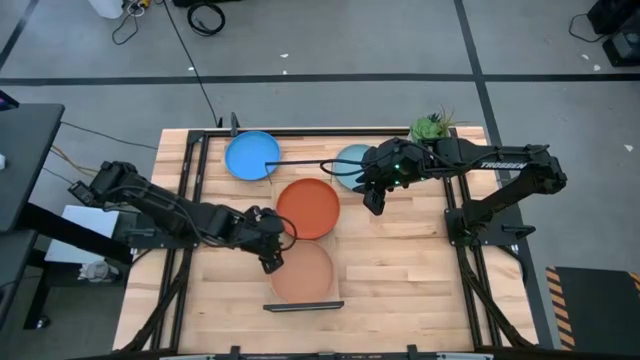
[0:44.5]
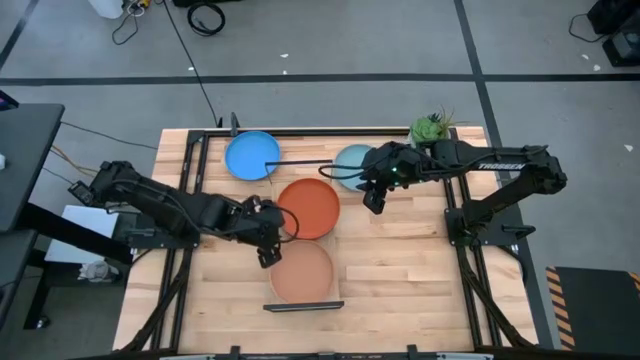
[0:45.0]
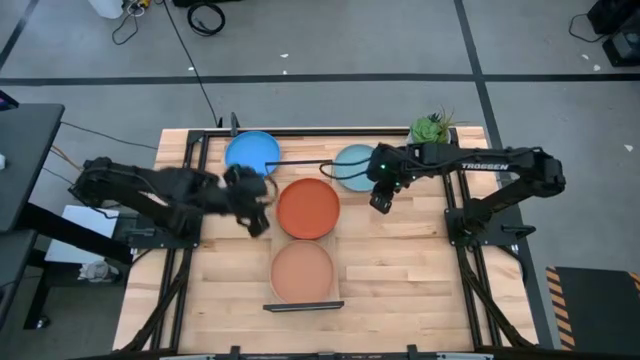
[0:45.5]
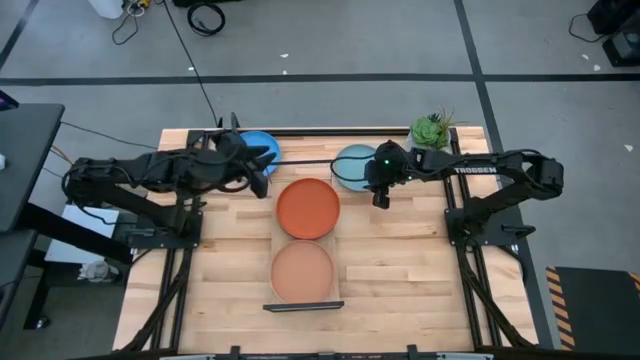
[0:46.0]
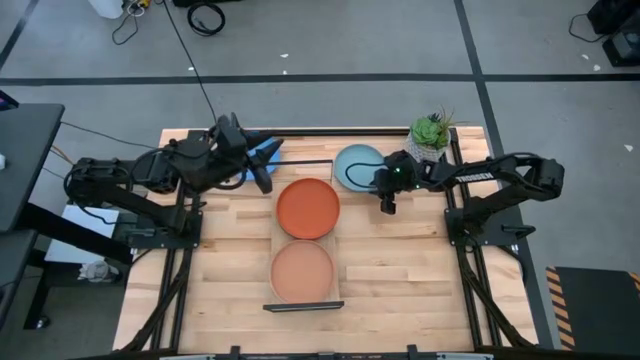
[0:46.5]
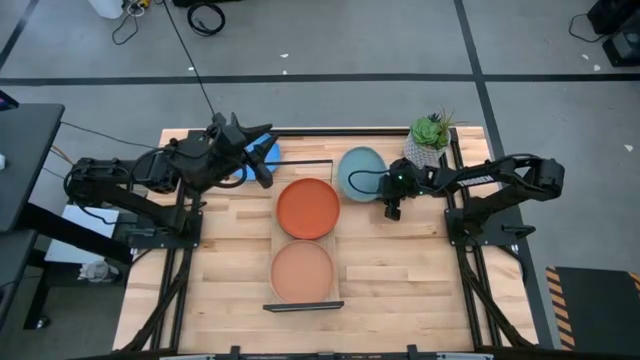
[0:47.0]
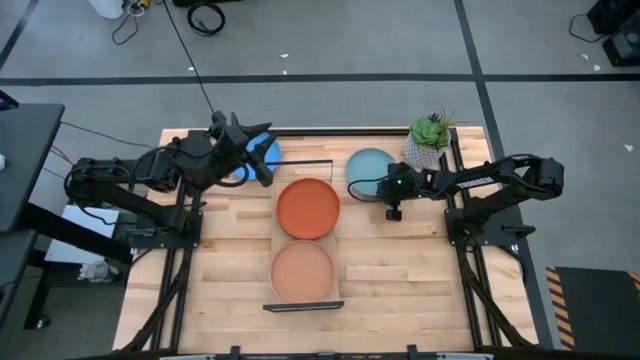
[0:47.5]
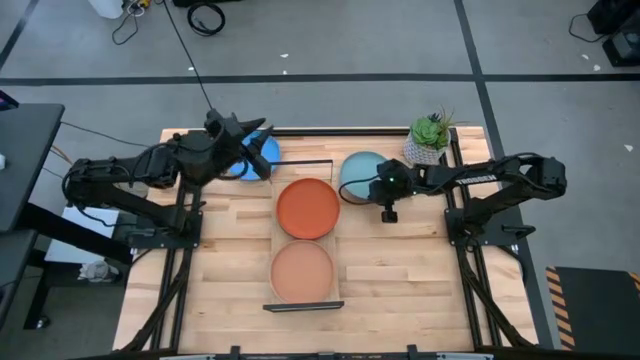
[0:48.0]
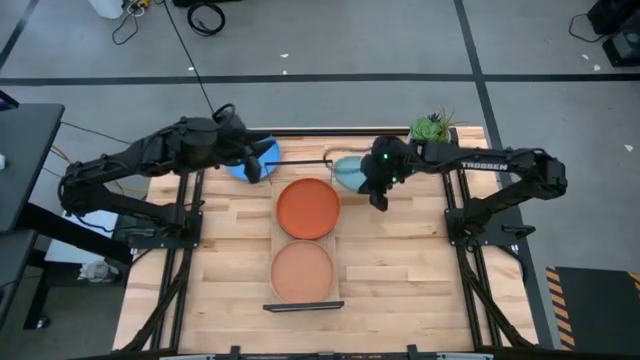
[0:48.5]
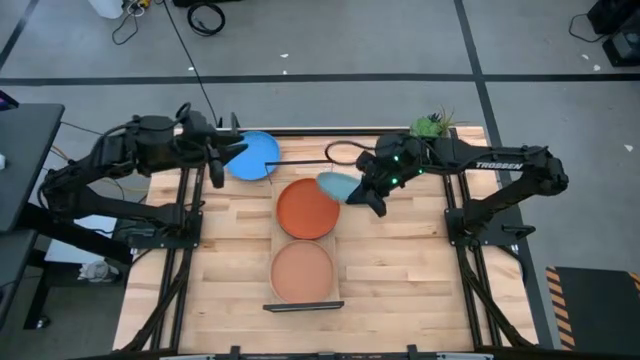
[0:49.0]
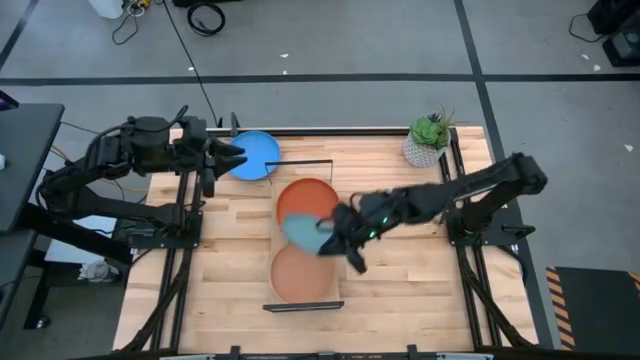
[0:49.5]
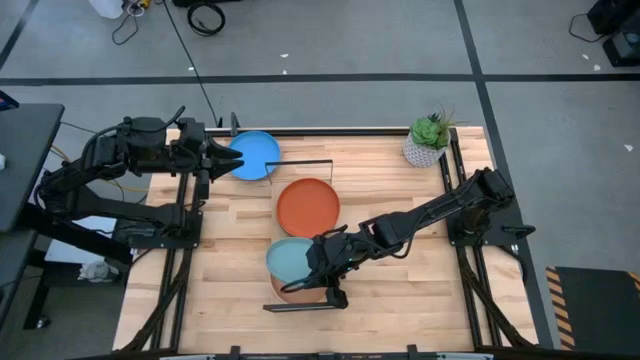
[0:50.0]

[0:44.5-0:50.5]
Task: Place and stack plates onto a shelf
Stack the light blue plate on the brown plate on the shelf

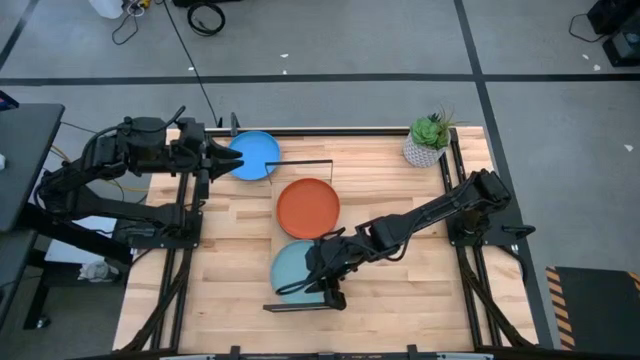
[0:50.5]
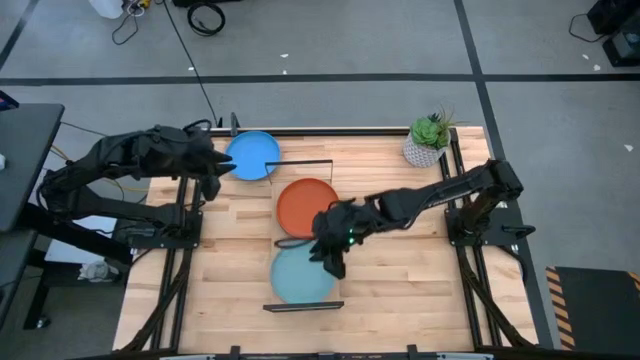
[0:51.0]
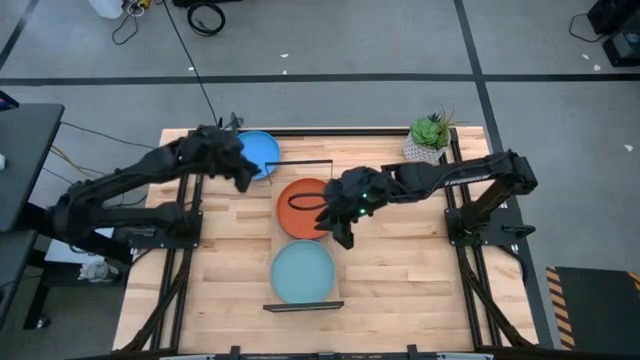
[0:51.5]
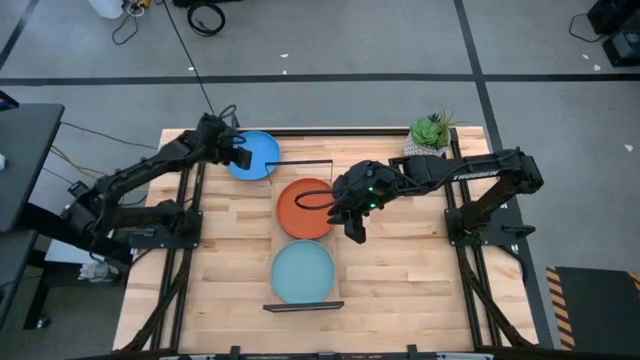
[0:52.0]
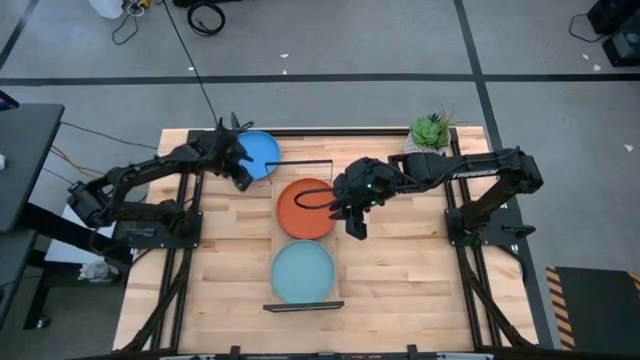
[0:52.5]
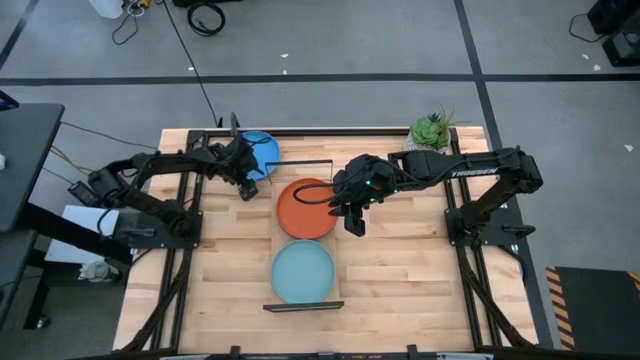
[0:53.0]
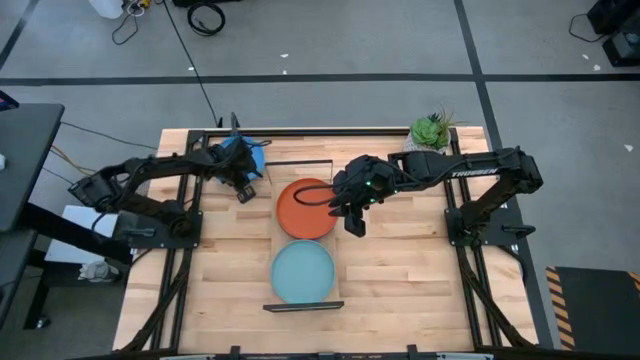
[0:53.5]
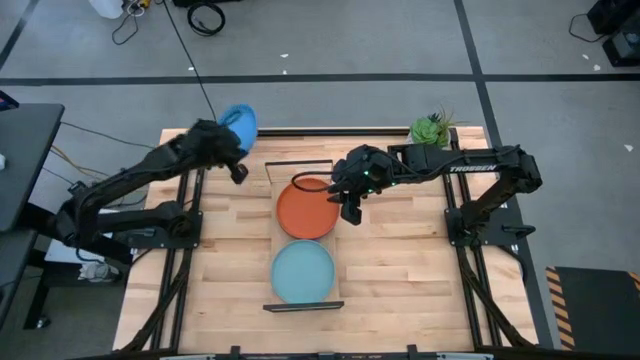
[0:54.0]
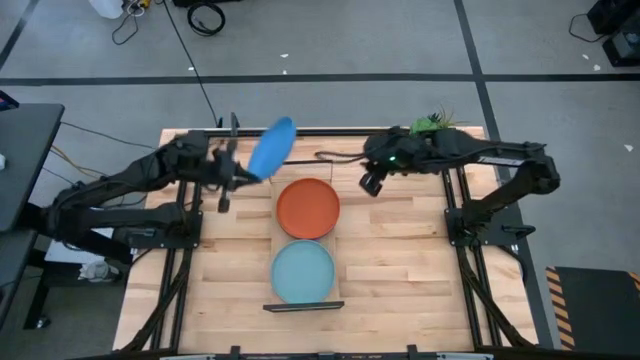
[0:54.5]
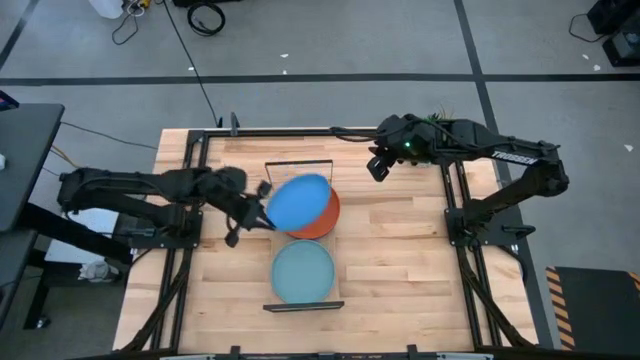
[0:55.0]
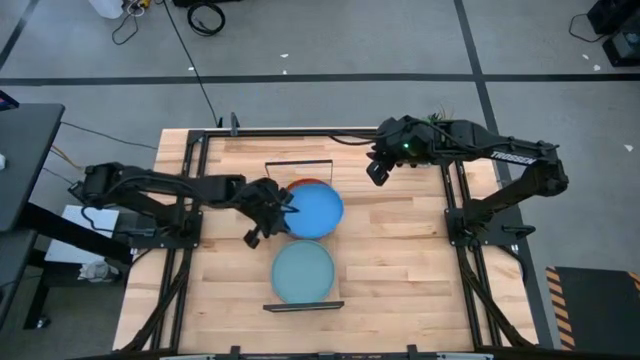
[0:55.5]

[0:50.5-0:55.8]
Stack the blue plate on the orange plate on the shelf

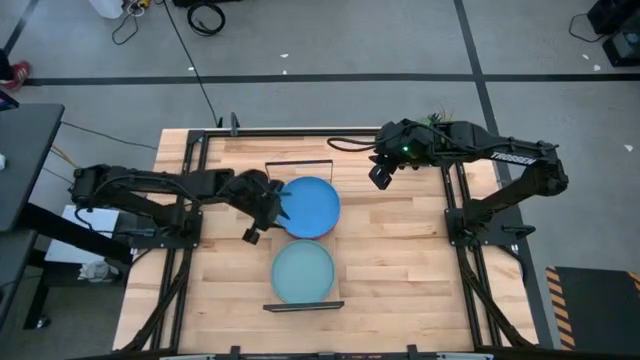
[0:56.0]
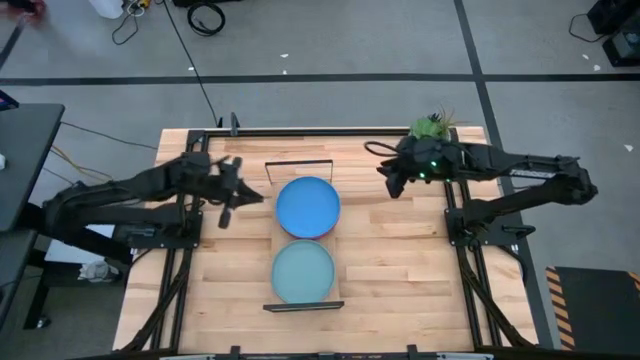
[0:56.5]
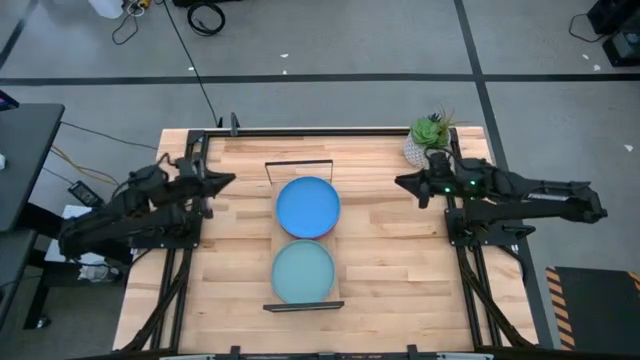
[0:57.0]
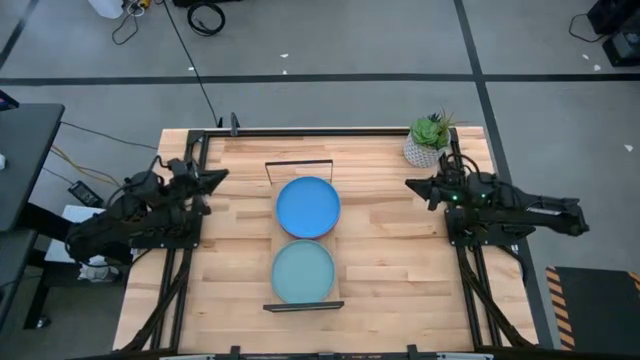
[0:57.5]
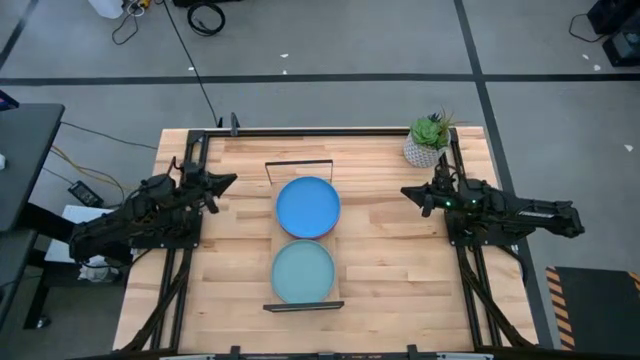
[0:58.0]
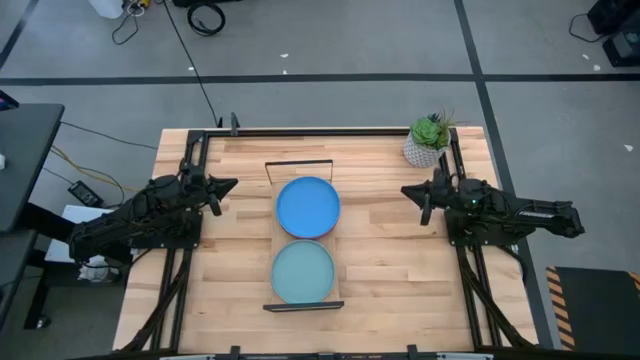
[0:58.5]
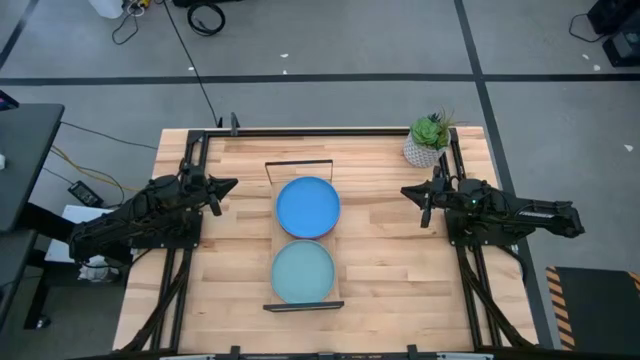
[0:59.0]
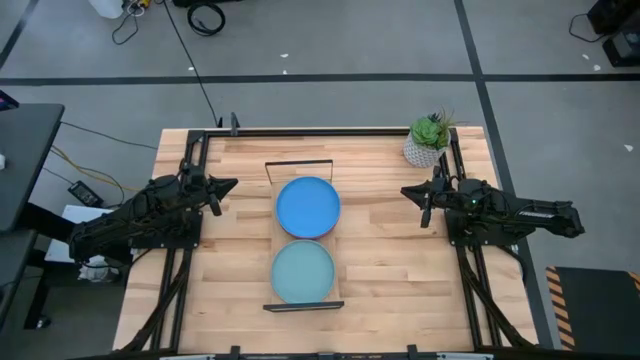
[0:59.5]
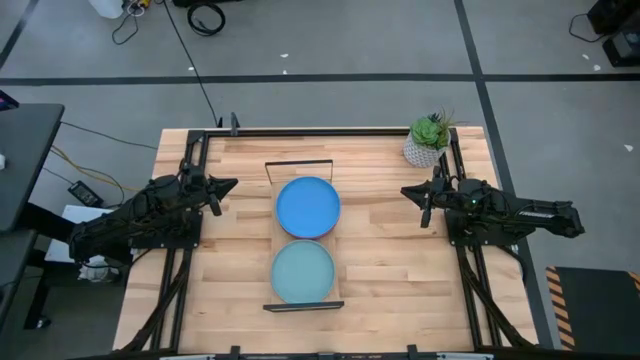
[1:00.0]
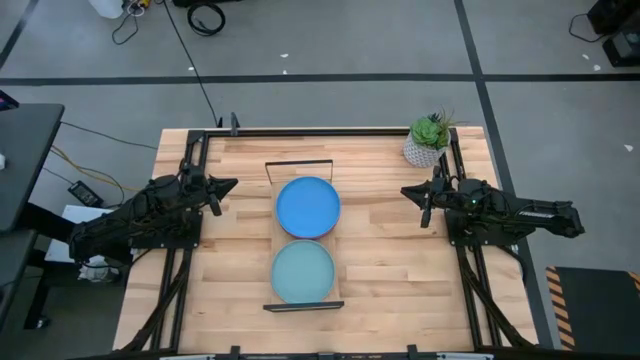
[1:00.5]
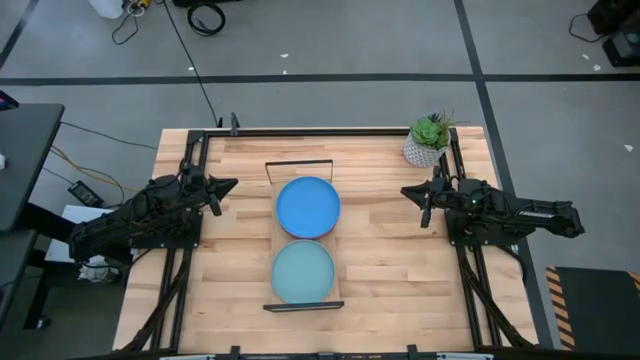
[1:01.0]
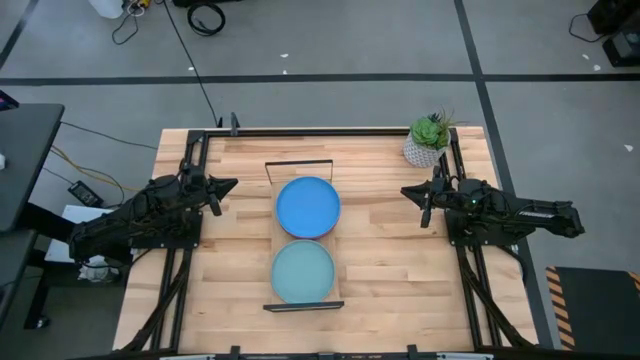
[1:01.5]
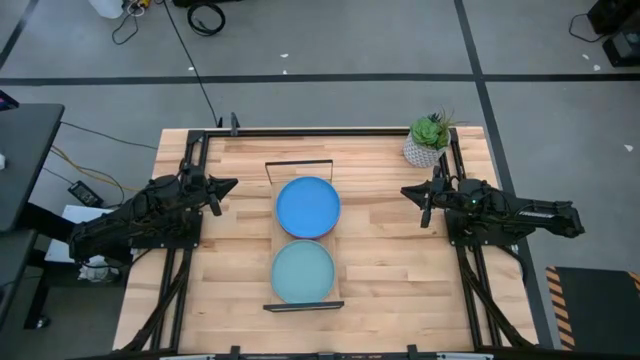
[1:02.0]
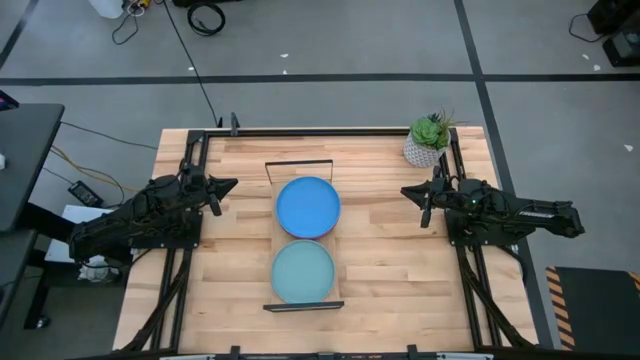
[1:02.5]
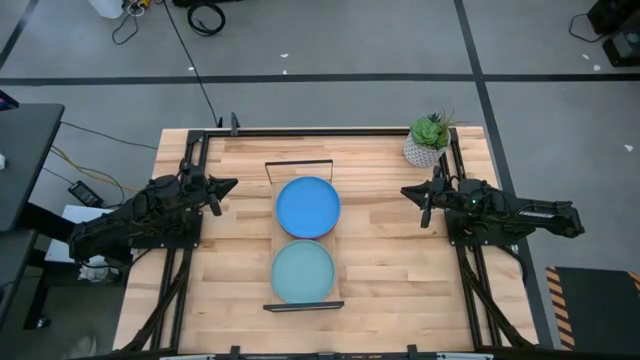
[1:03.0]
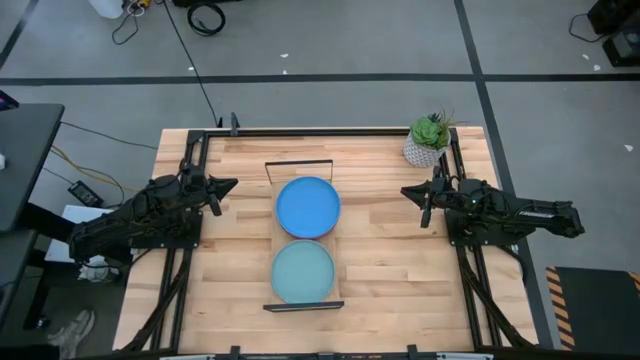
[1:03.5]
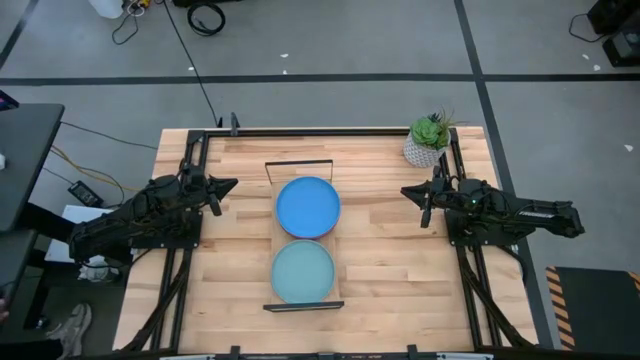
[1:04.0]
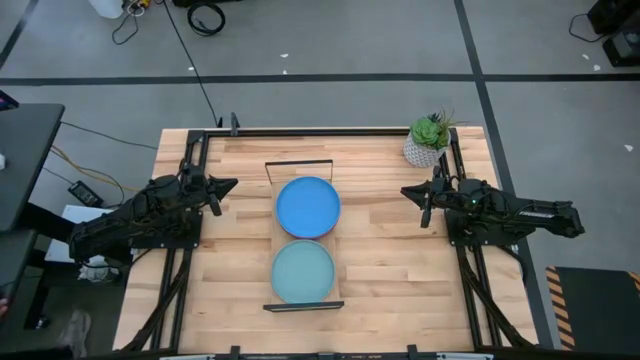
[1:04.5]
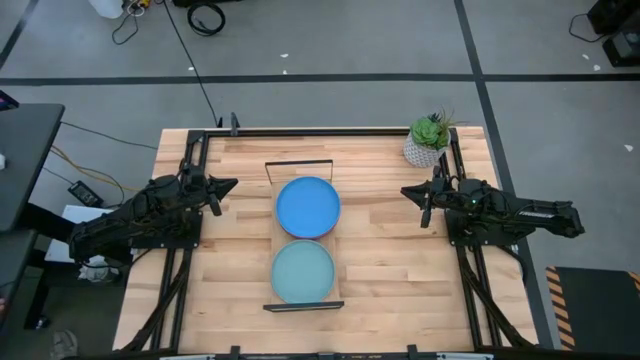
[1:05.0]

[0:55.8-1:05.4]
Return to Home Position

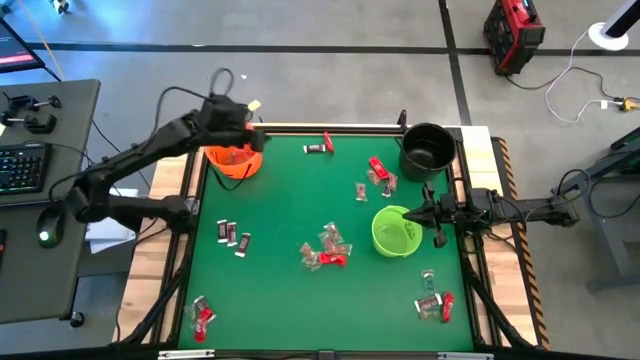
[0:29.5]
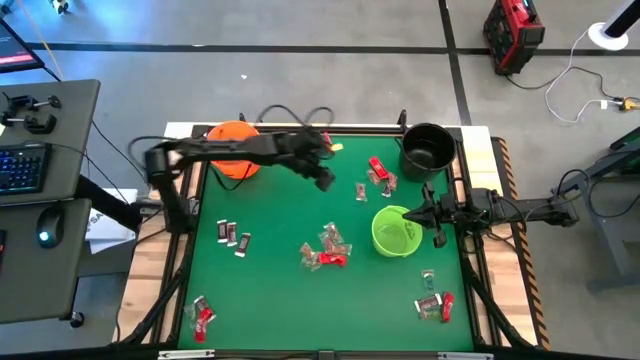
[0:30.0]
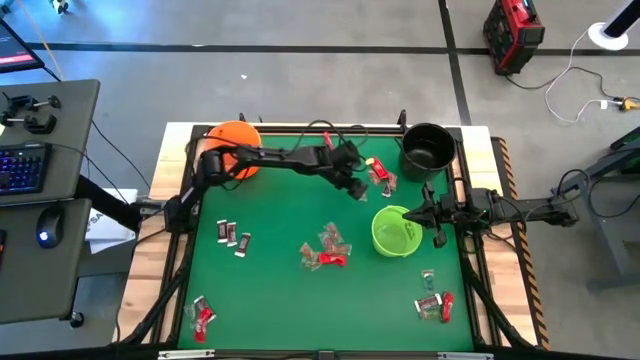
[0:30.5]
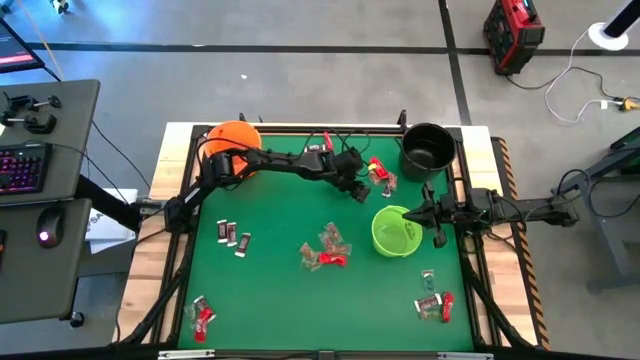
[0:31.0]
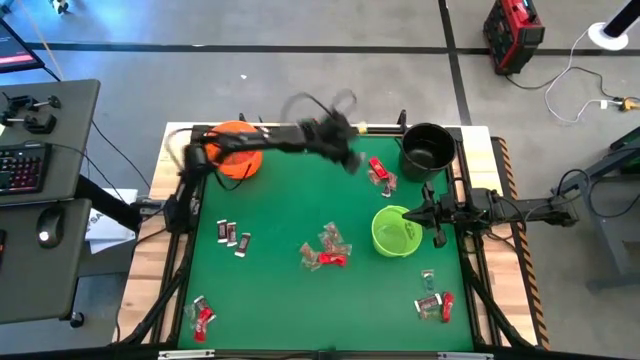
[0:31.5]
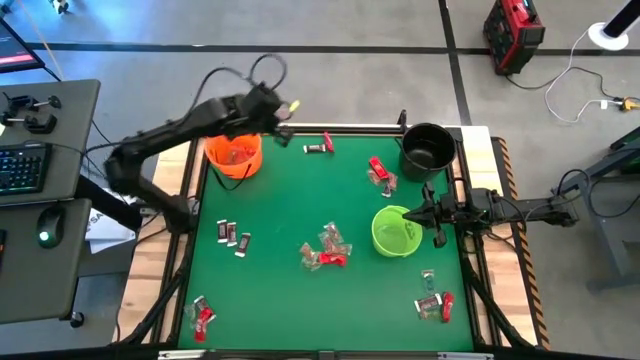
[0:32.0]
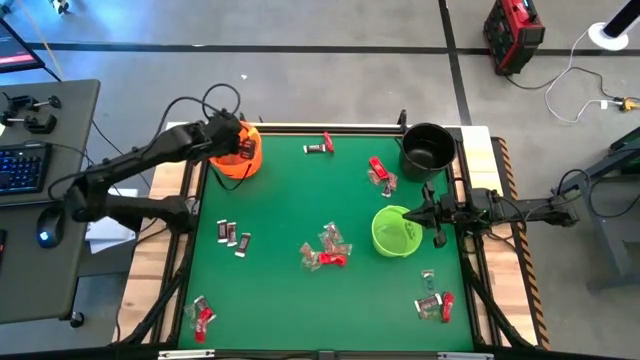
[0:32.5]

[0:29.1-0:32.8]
Task: Sort candy by brand, put in halloween buckets
Put the orange gummy into the orange bucket
